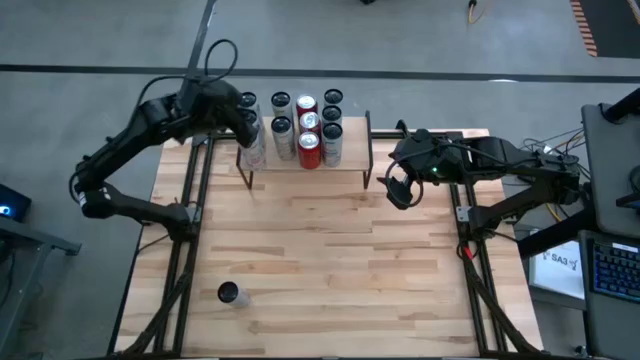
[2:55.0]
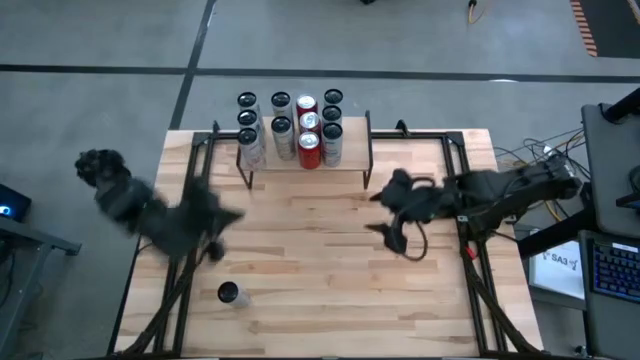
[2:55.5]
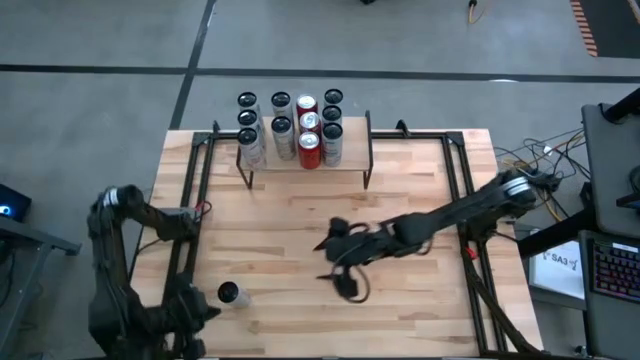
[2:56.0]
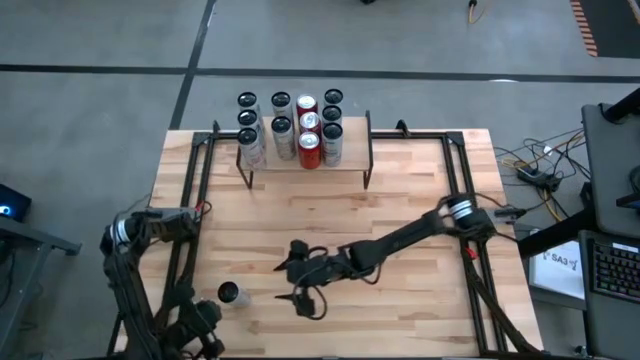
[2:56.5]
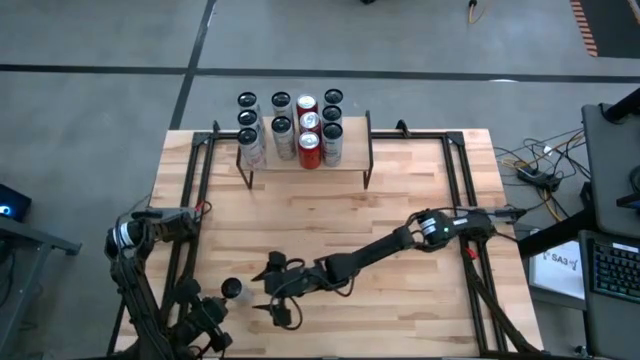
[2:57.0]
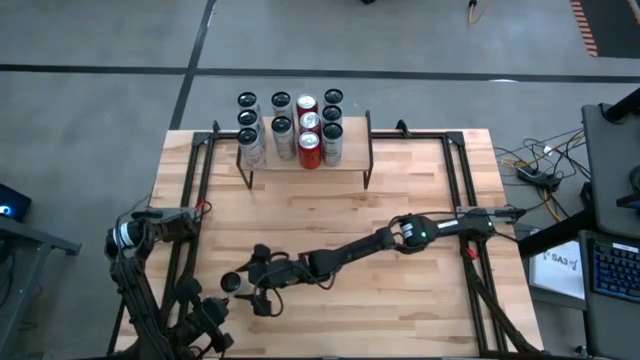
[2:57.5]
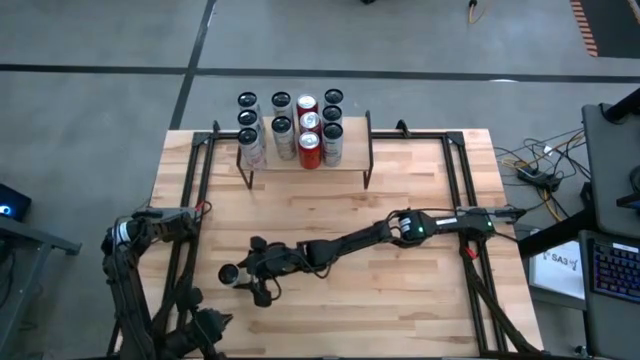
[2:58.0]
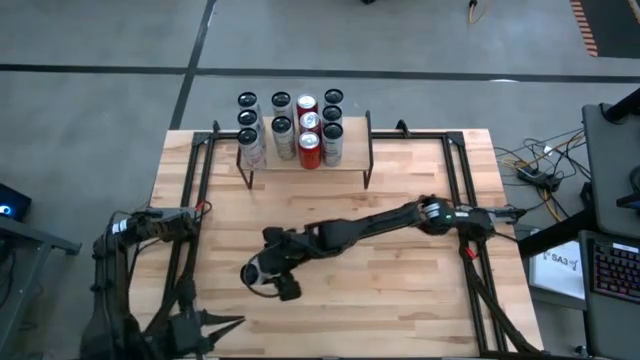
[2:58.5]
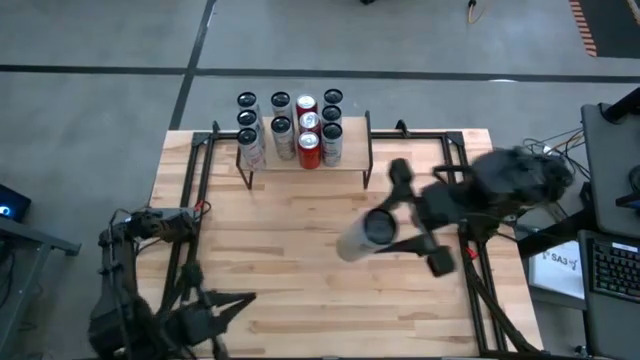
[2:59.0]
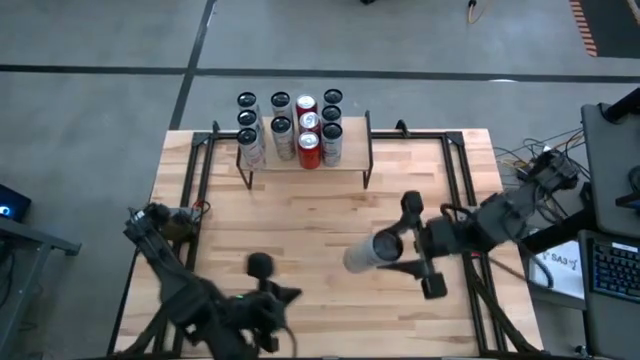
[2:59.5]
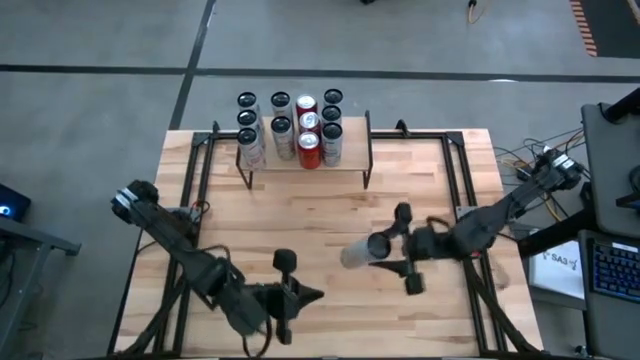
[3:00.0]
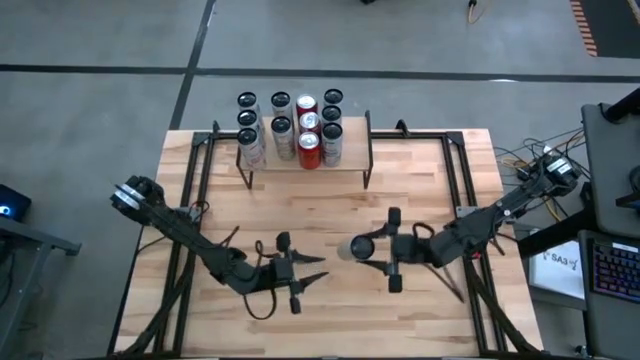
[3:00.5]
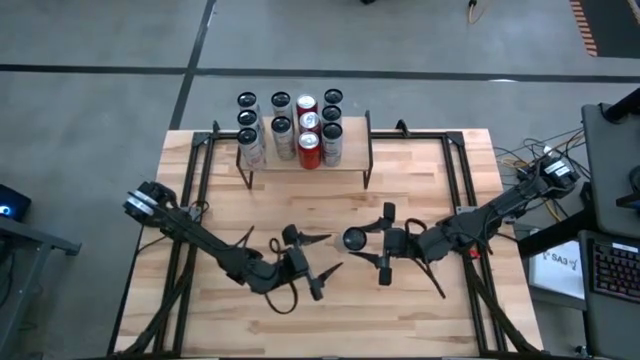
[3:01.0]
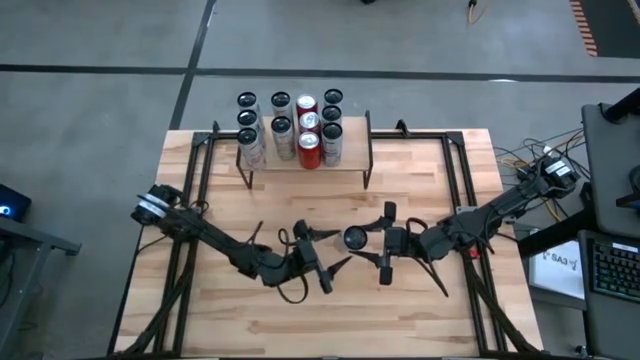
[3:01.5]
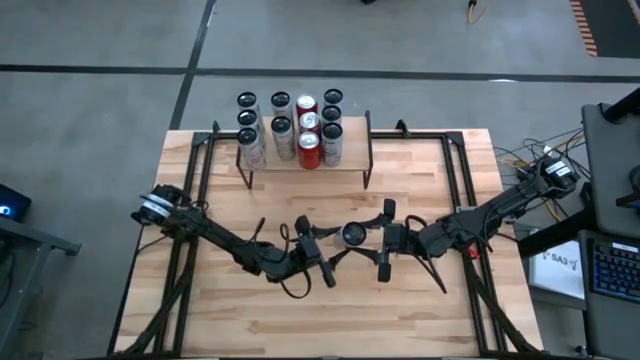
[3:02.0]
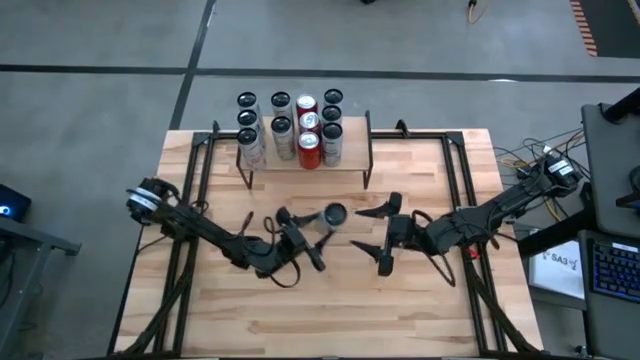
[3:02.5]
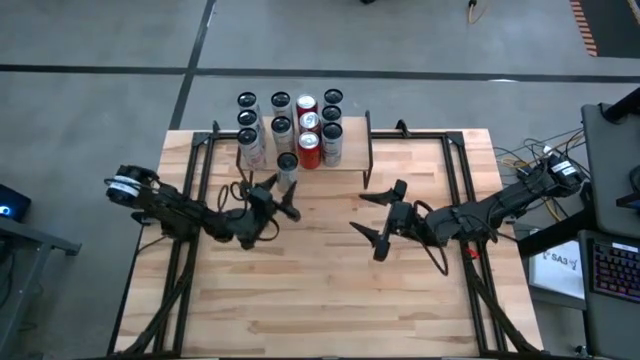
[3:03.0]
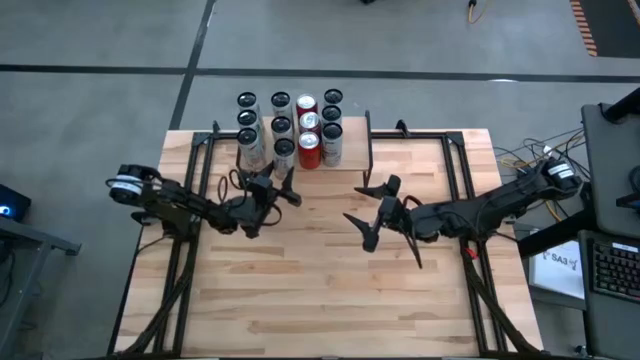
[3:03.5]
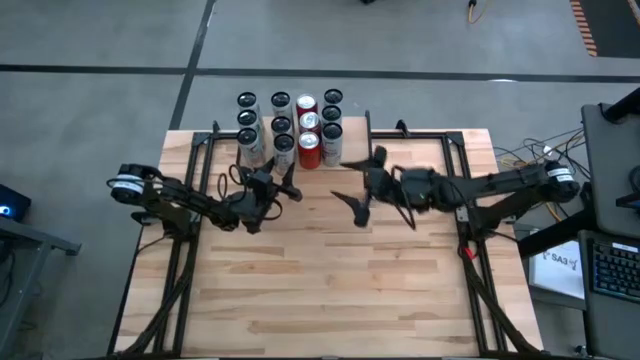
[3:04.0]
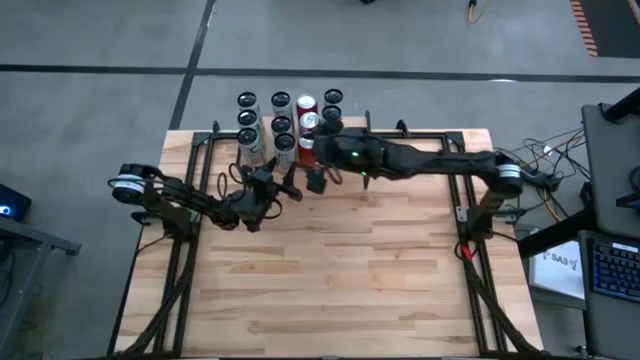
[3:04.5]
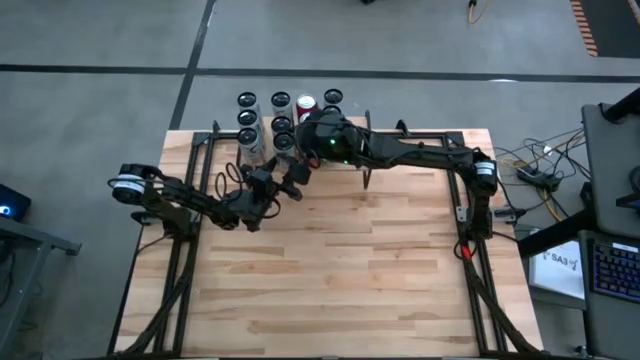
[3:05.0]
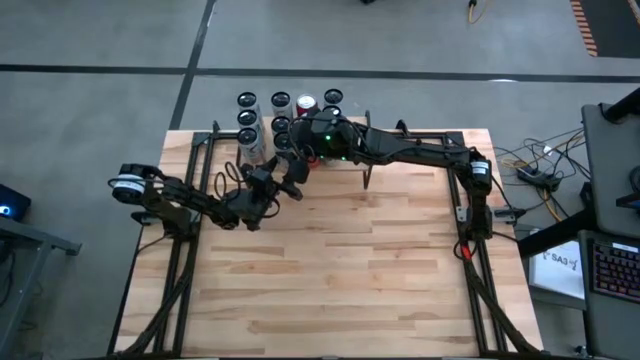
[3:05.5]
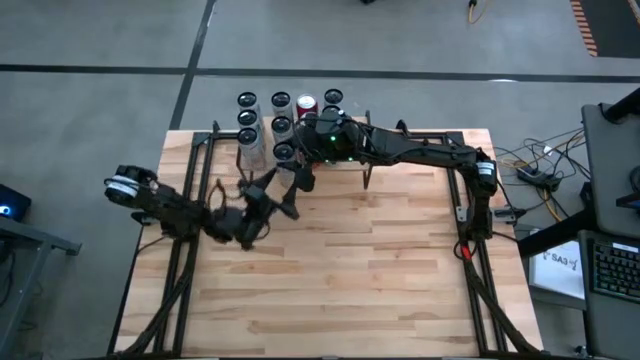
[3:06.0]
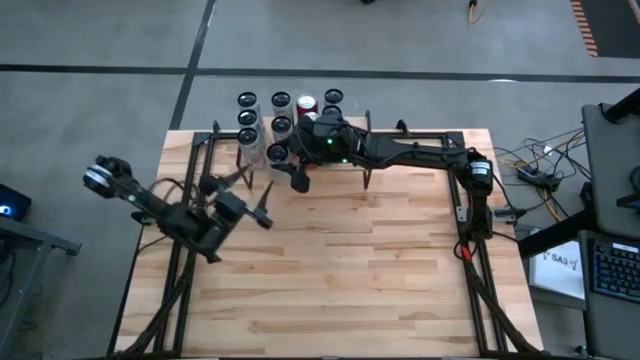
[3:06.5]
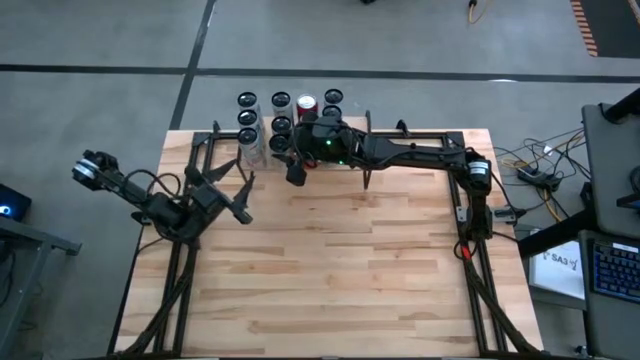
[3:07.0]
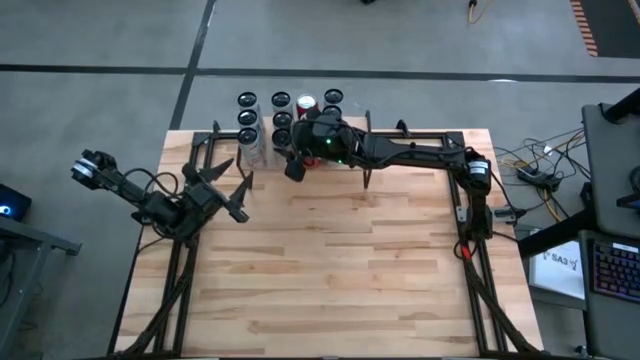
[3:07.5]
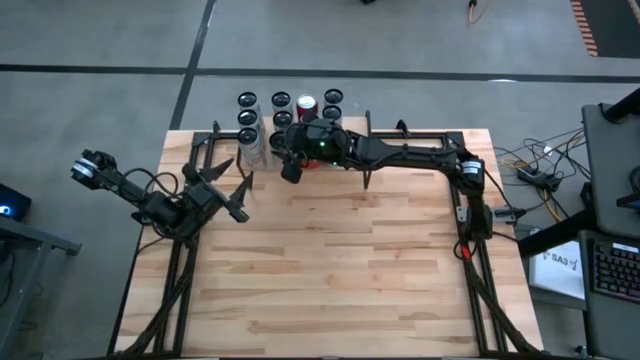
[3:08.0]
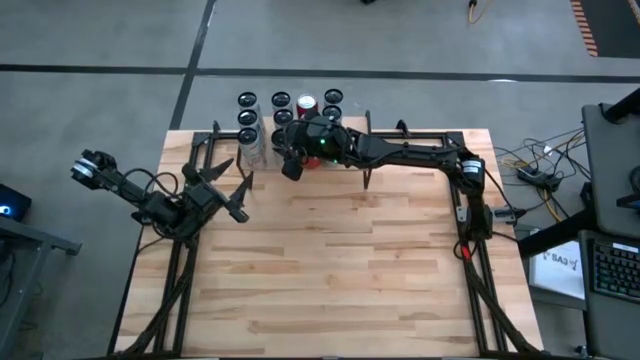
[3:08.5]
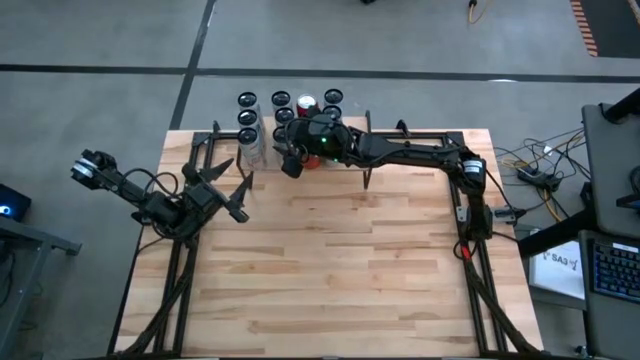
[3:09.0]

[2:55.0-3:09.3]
Task: Place canned beverage on shelf
Put the white soda can aligned with the other white soda cans on the shelf

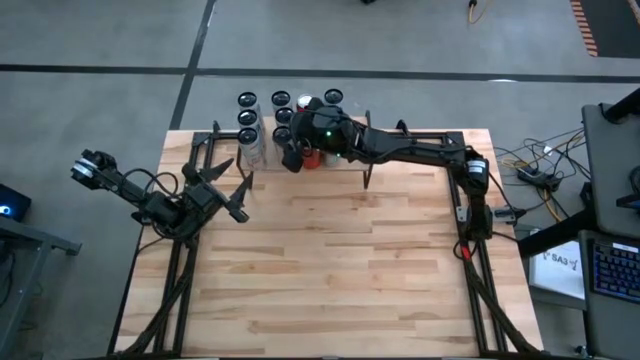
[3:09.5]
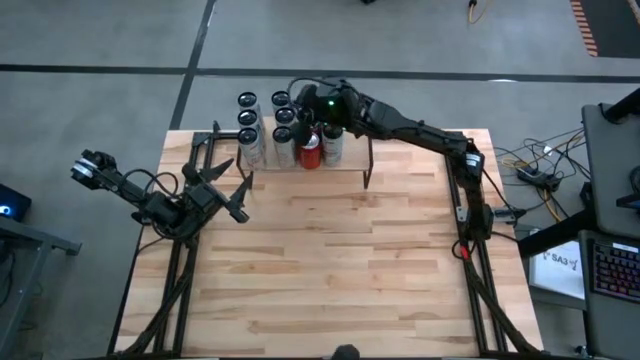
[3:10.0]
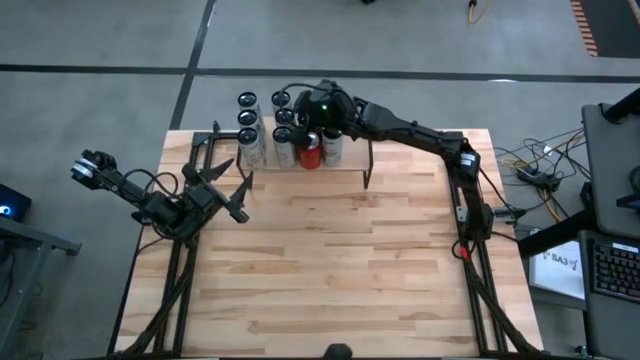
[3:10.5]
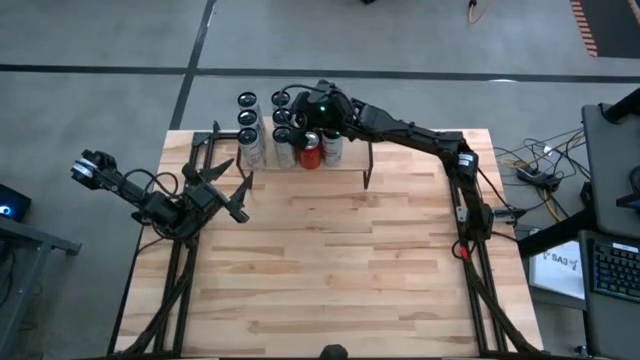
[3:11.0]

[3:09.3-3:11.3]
Adjust the white soda can

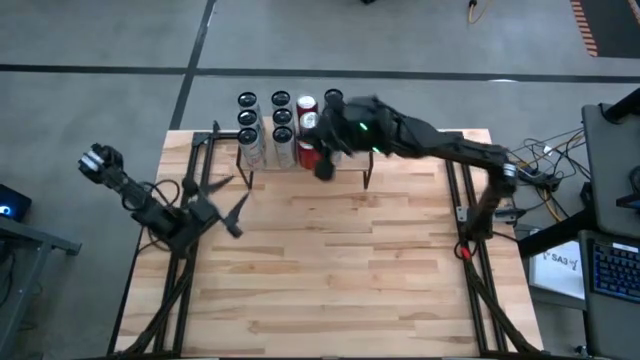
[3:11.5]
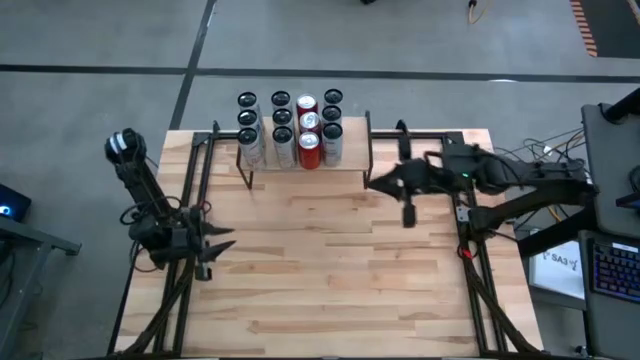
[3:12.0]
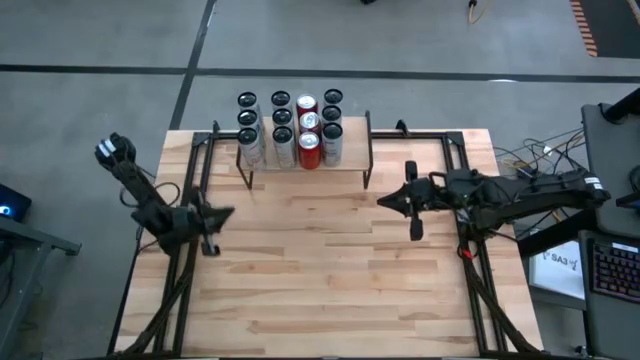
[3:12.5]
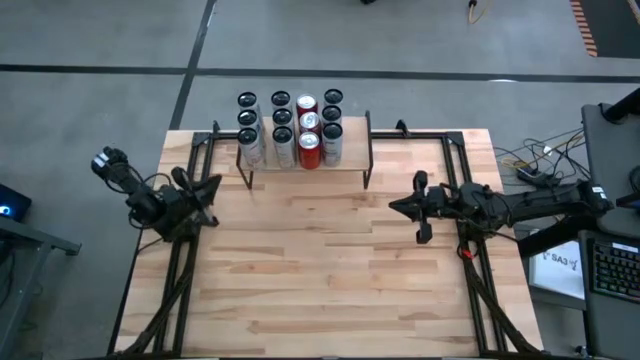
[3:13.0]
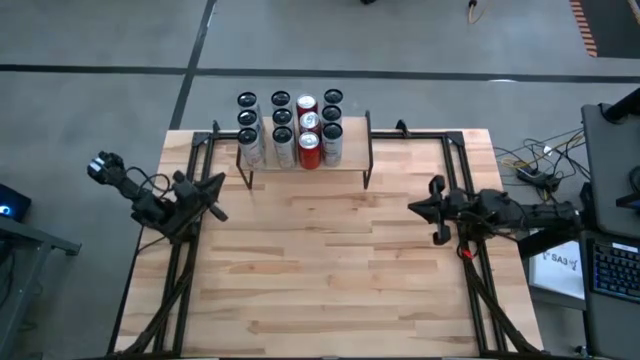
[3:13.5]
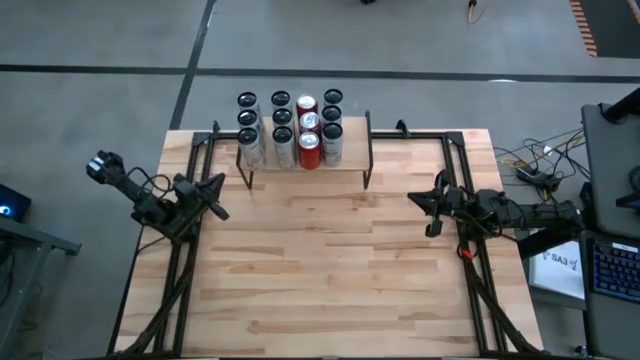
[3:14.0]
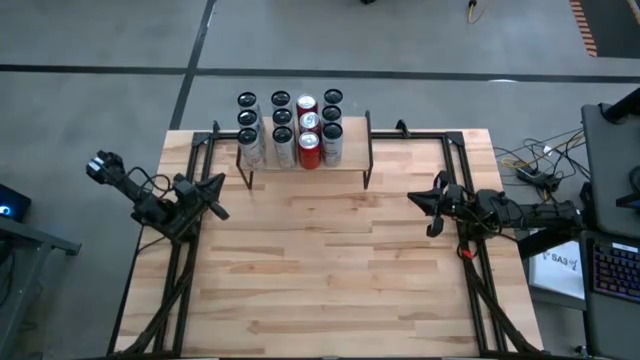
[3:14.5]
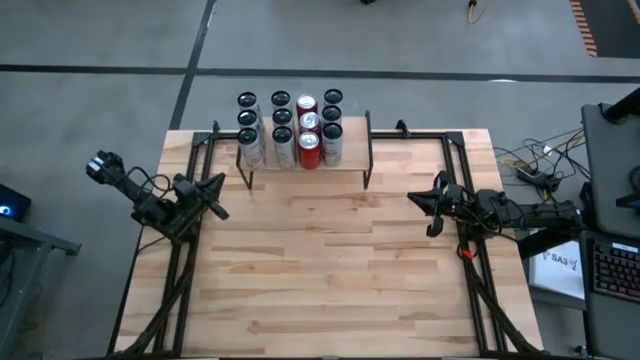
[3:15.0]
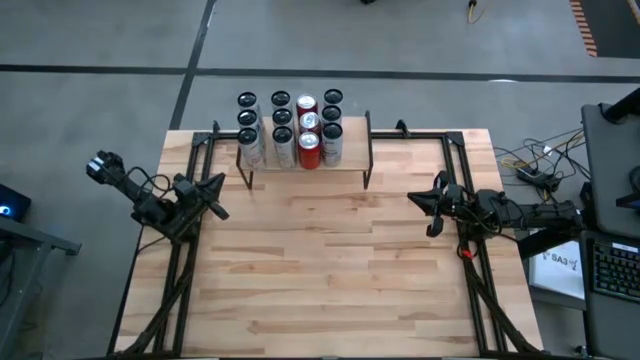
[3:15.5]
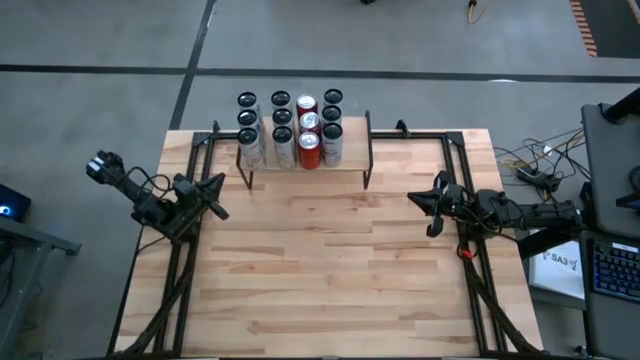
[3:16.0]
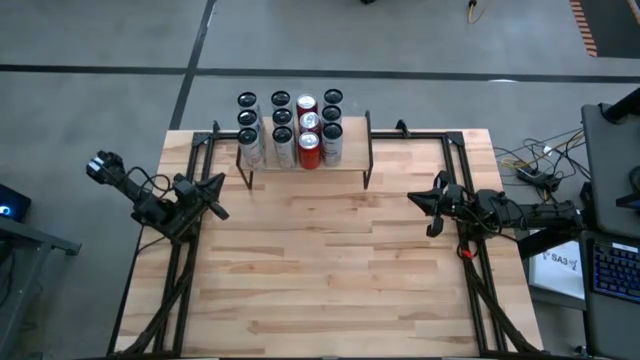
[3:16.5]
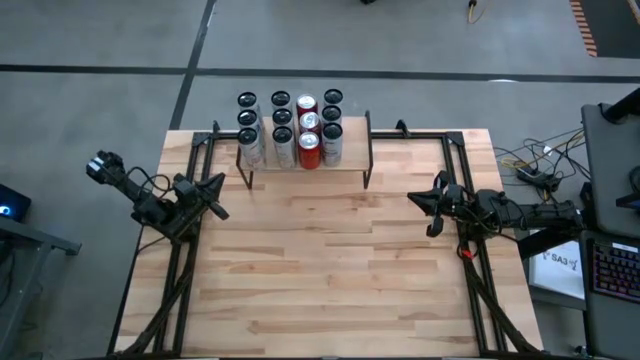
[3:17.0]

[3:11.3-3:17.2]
Return to Home Position
